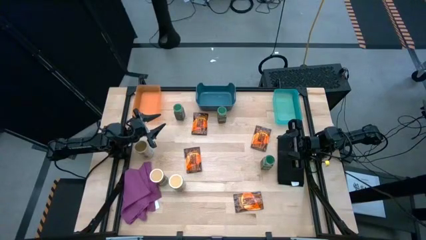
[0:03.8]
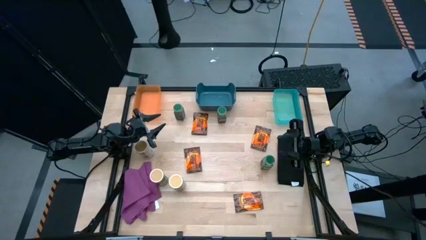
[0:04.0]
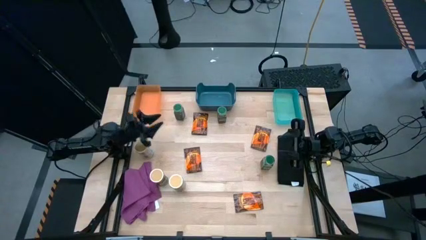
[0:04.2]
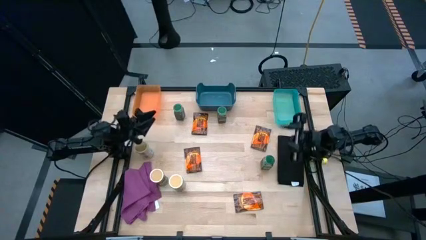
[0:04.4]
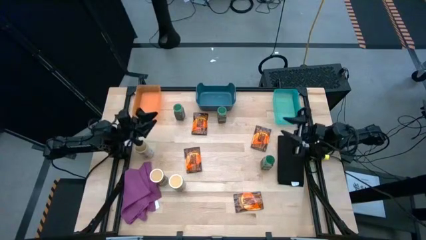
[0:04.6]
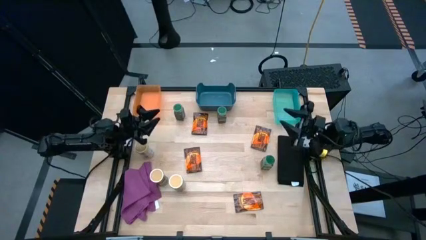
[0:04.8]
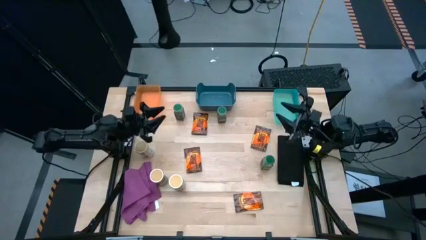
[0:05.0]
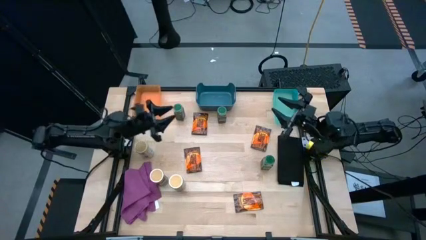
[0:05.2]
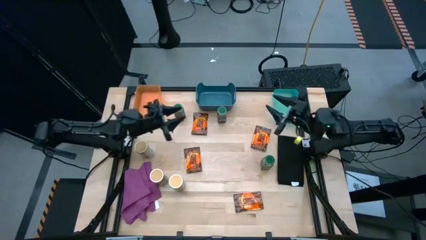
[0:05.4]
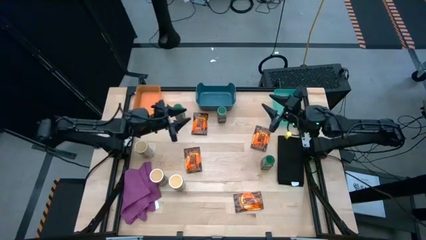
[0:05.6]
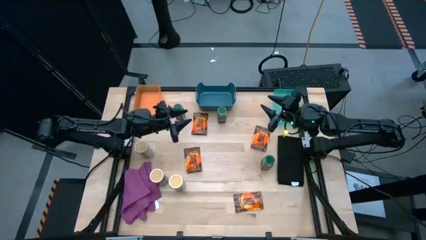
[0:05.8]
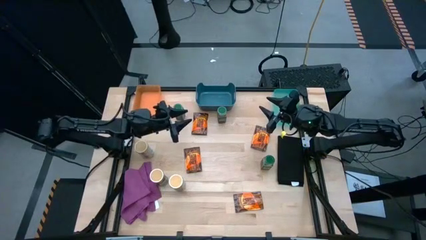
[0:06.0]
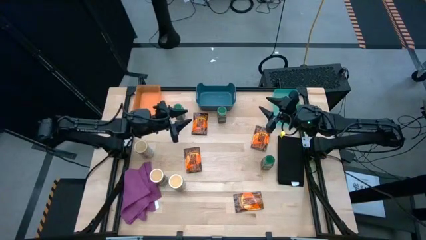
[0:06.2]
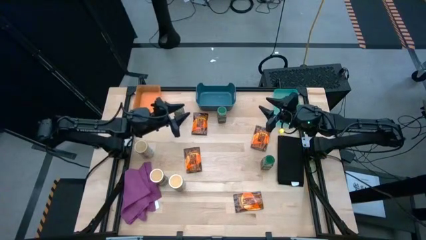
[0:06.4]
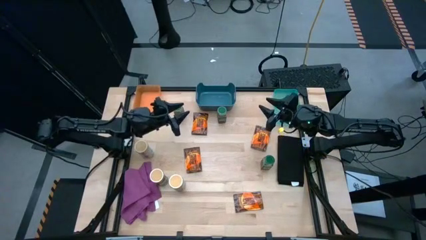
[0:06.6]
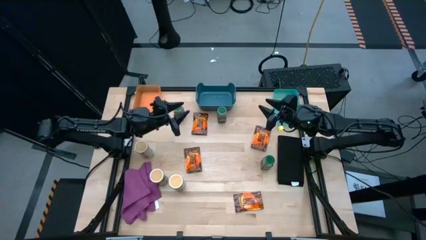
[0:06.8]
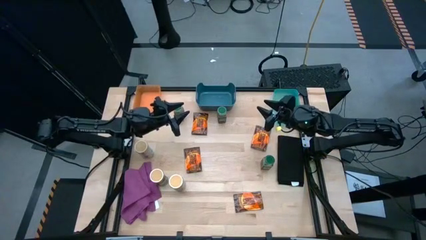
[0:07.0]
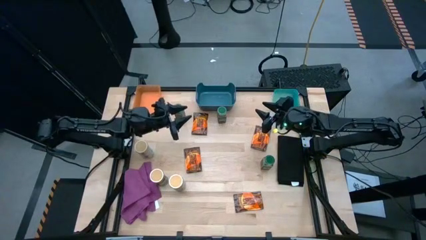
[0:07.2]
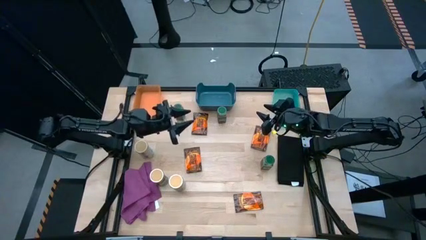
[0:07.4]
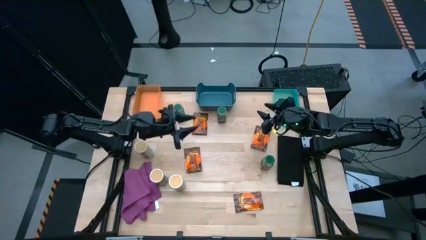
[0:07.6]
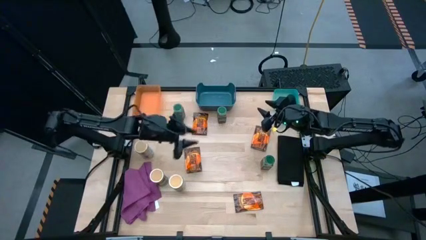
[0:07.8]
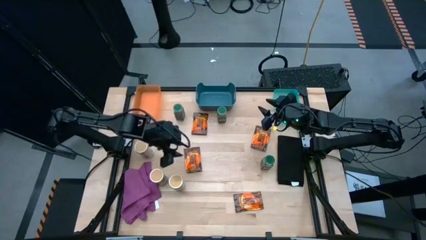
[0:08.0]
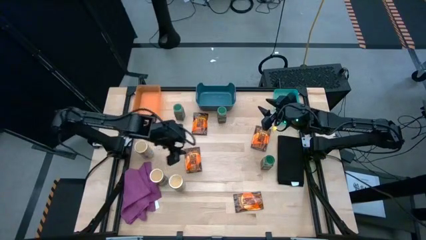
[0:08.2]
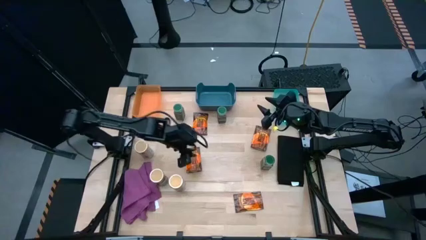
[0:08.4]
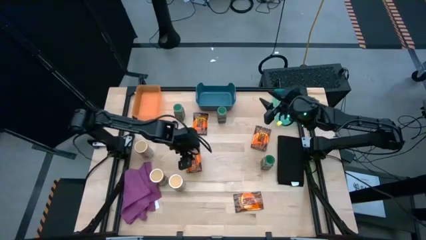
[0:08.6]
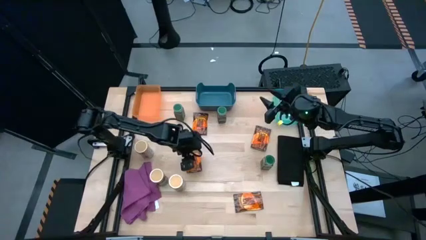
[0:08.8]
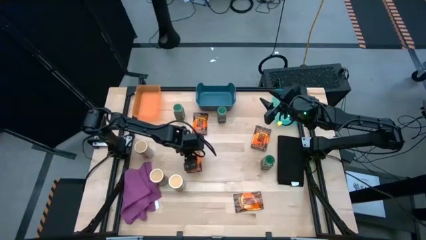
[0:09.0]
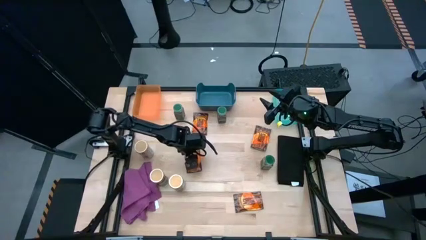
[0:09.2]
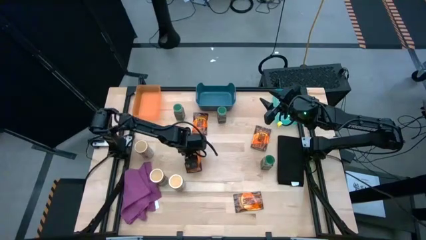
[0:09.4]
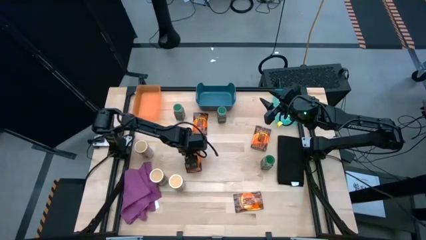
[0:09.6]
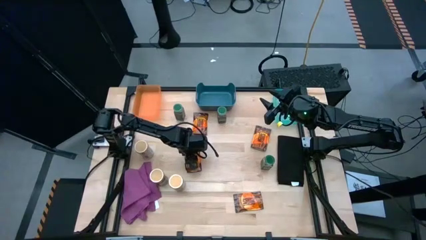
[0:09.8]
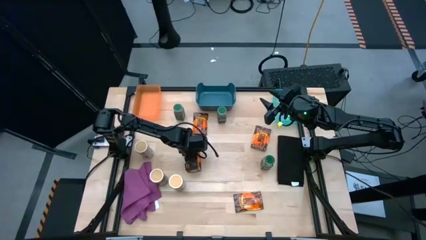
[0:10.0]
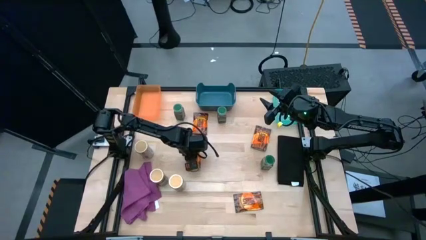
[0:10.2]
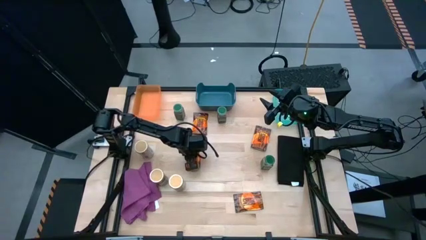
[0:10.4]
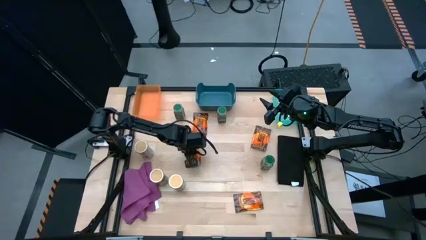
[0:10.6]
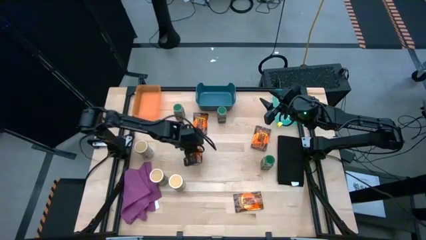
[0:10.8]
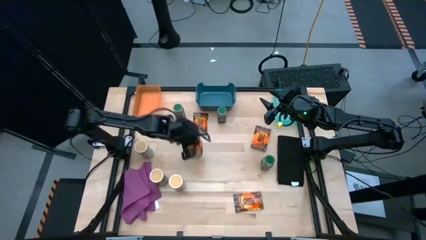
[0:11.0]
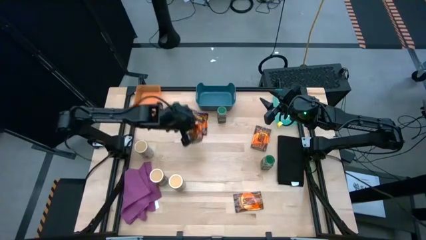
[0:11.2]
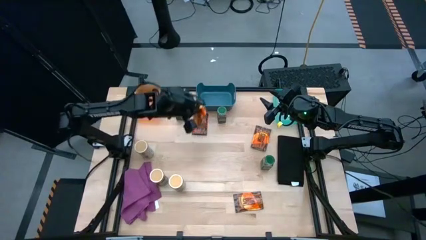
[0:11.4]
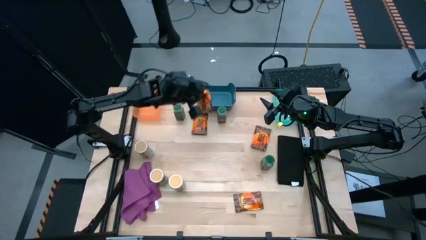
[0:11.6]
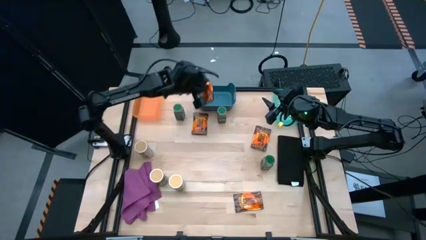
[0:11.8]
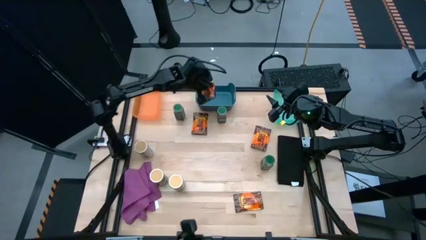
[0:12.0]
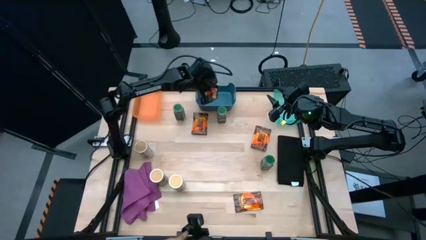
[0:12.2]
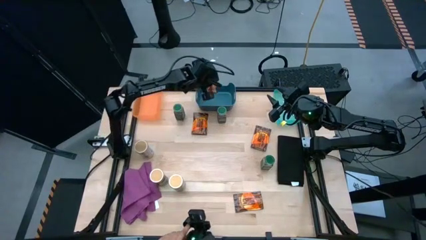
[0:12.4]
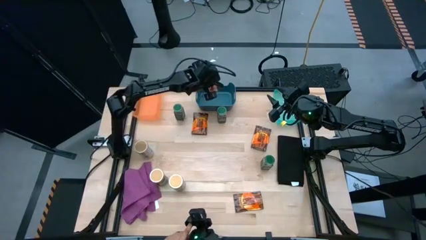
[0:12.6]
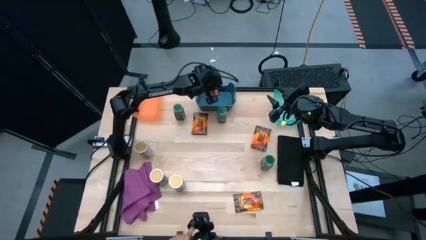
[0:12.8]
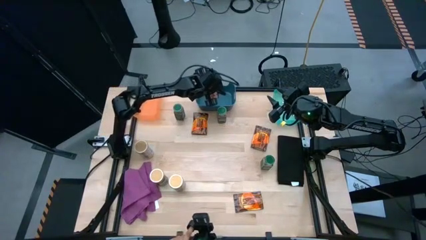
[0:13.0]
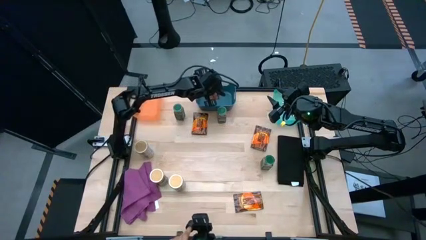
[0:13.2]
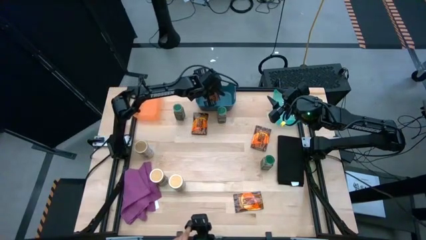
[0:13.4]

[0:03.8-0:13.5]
Task: Sort spices by type
Put the orange seasoning into the dark blue bin

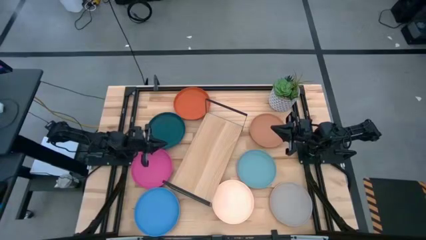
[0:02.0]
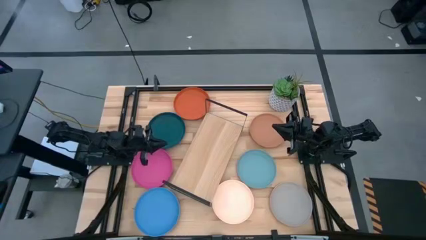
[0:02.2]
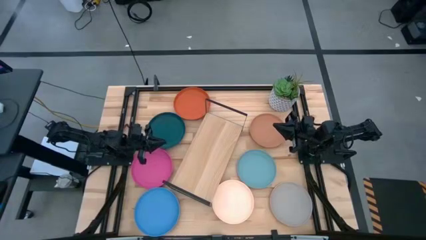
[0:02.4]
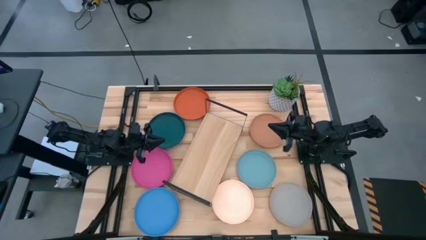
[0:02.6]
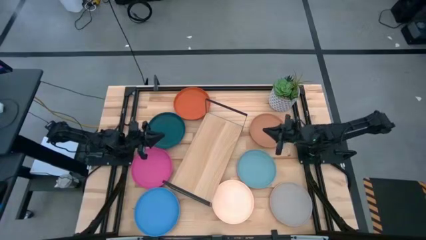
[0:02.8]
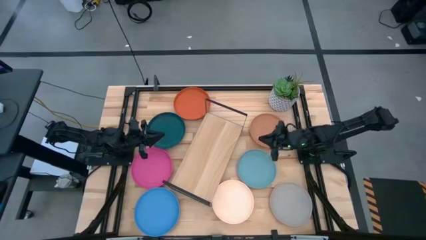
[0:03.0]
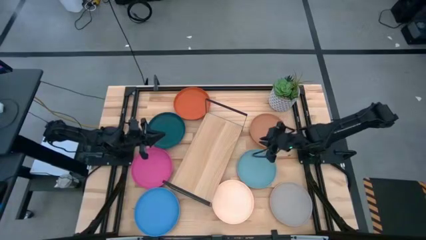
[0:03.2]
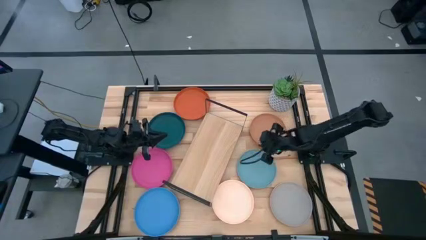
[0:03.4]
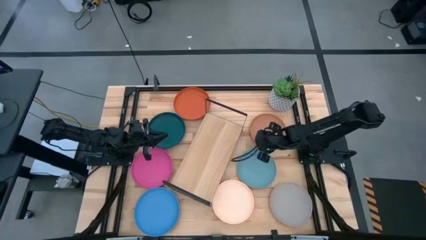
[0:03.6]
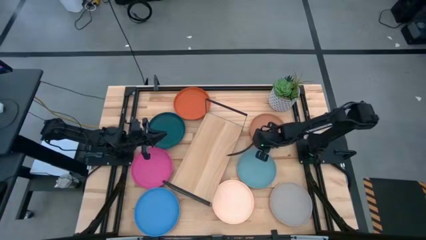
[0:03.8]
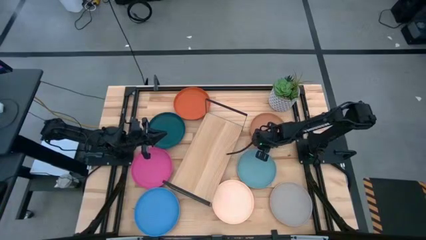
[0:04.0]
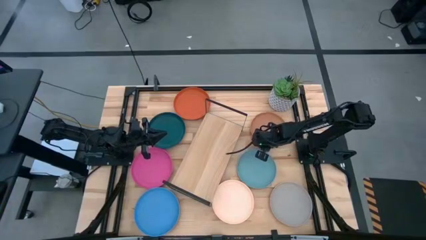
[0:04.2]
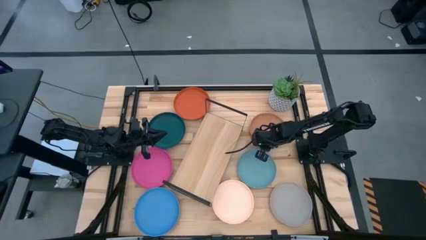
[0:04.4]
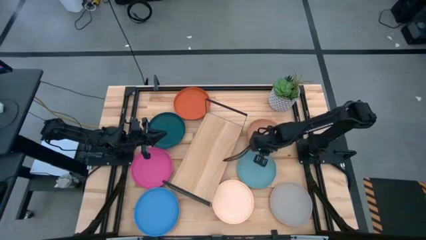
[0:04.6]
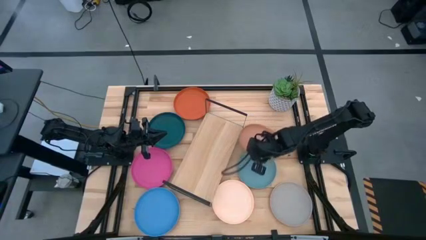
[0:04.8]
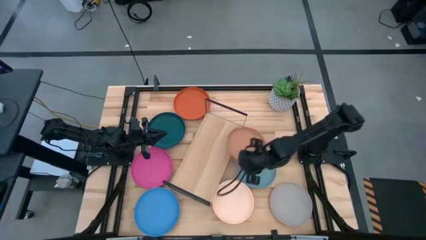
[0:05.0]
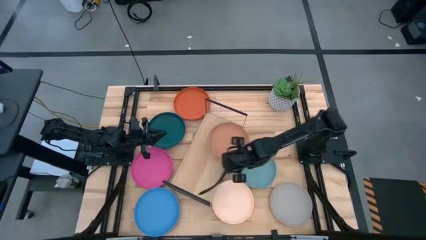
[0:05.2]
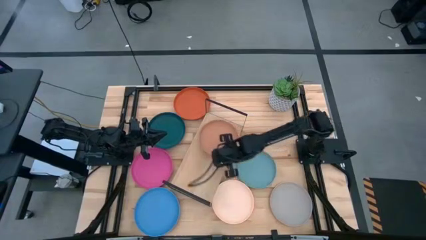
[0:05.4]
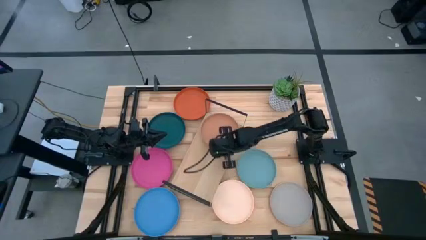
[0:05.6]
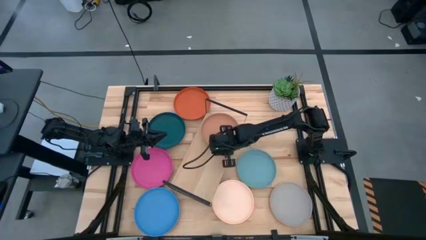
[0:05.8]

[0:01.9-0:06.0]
Task: Place and stack plates onto a shelf
Put the brown plate on the shelf
